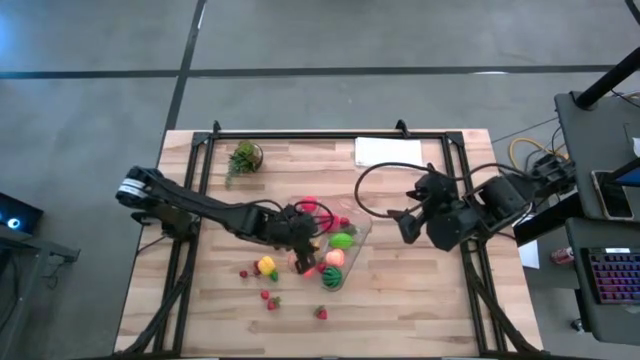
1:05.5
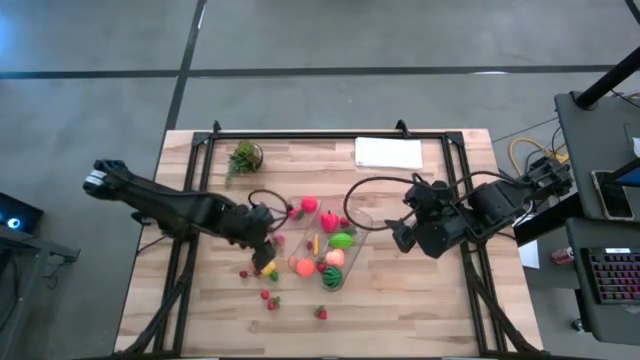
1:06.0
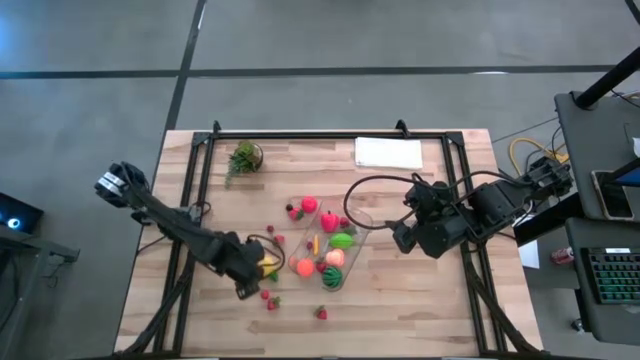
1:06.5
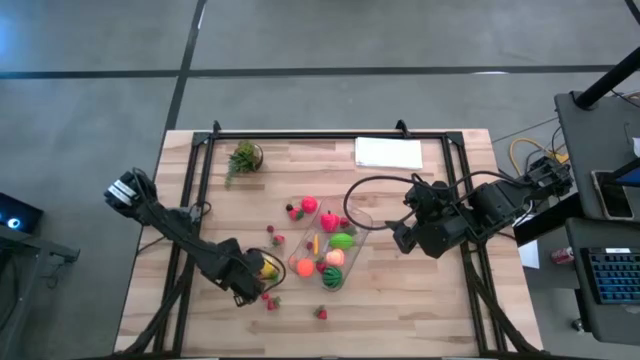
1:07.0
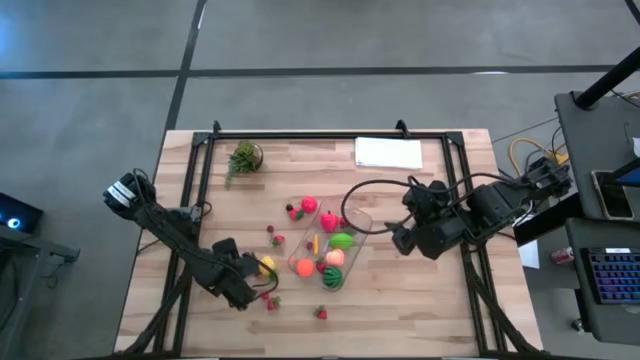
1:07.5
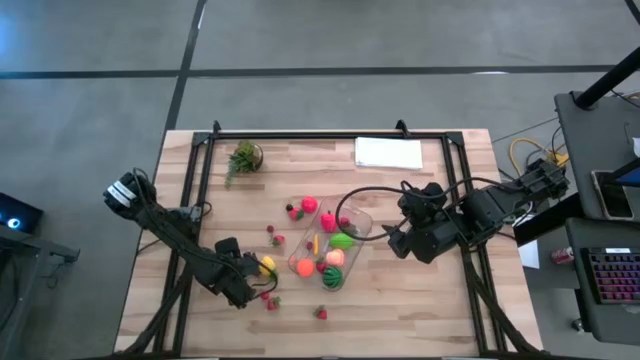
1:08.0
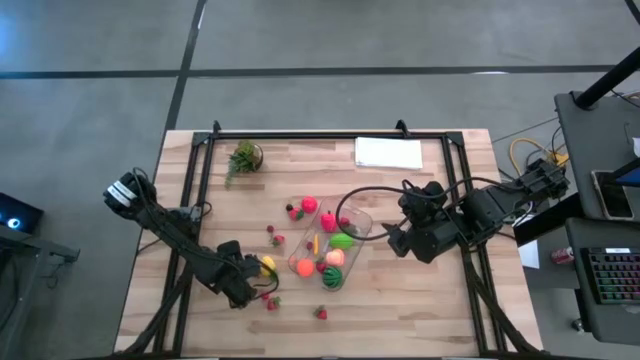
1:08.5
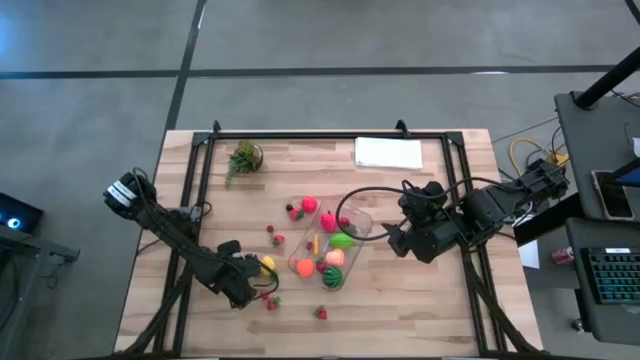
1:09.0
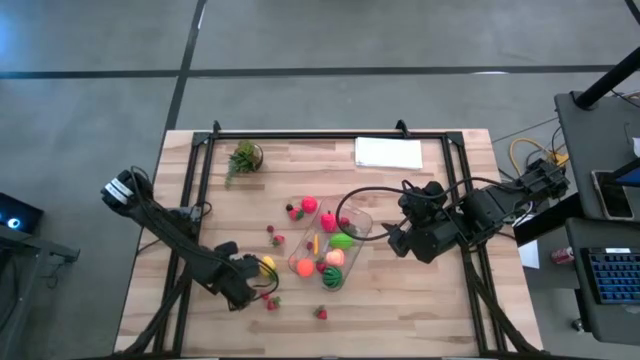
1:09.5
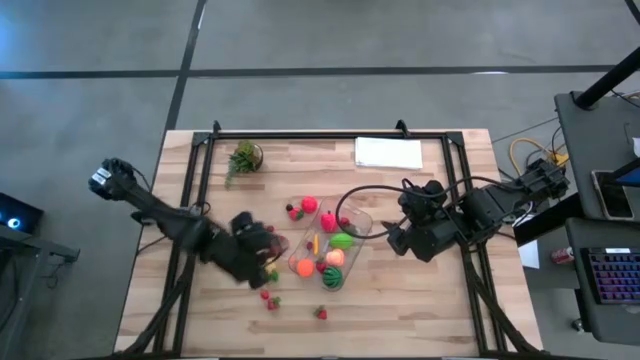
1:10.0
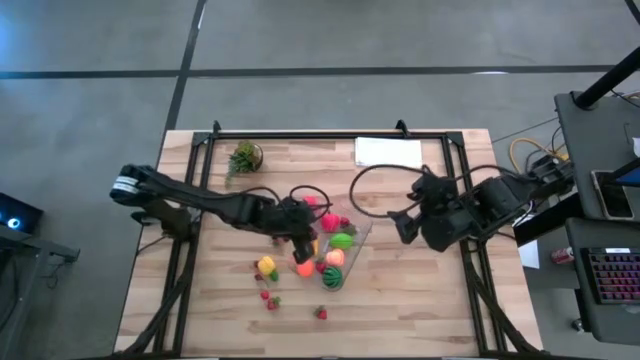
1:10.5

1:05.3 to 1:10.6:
Task: Pick and placing Produce into tupperware
Put the red cherry into the transparent bin

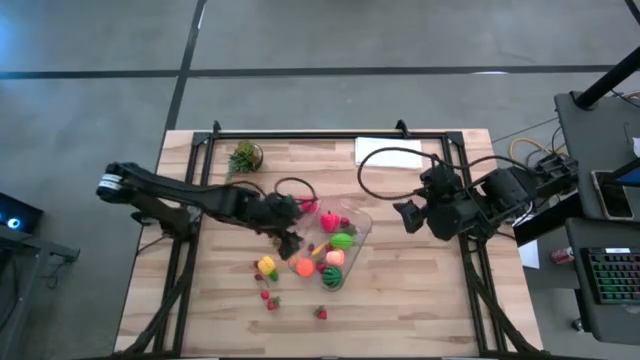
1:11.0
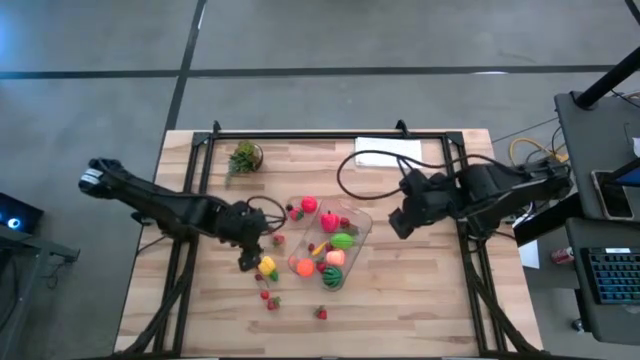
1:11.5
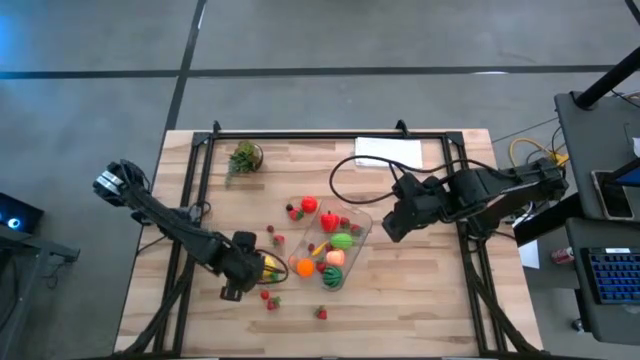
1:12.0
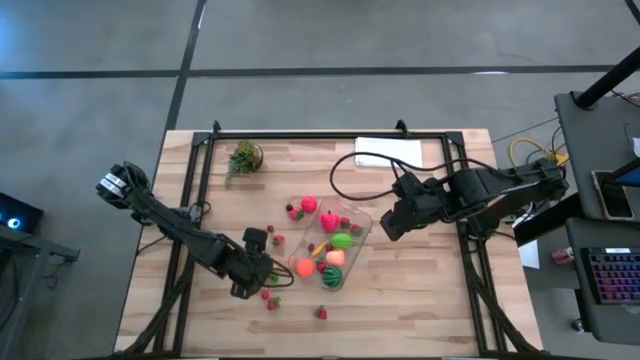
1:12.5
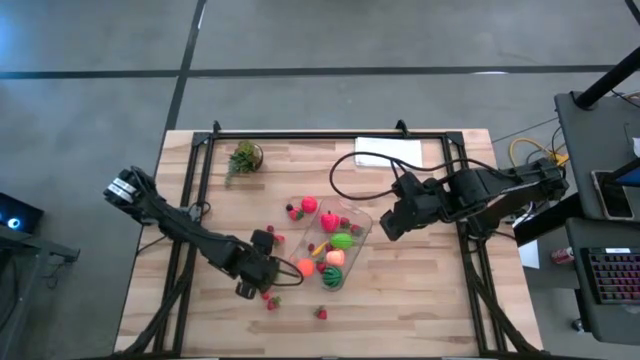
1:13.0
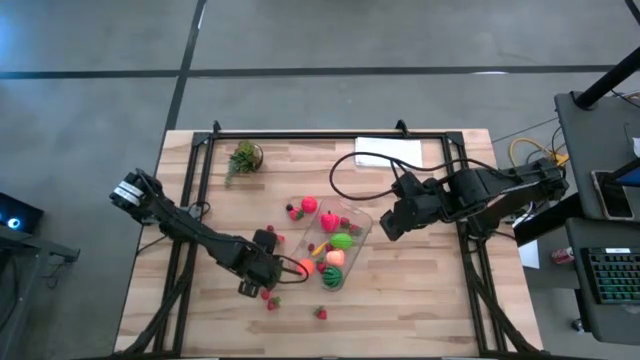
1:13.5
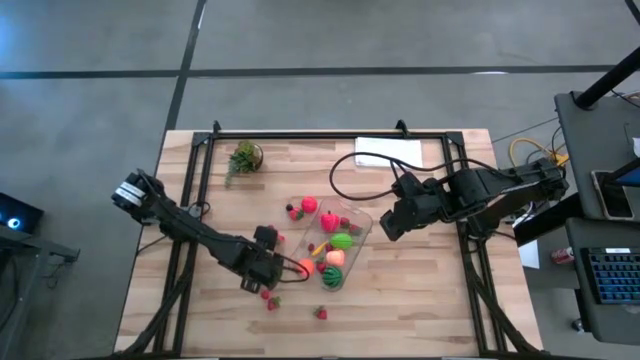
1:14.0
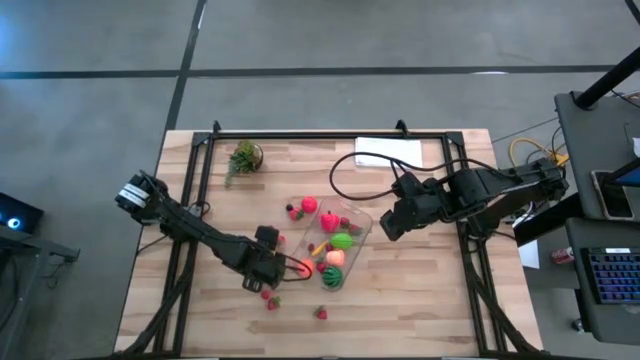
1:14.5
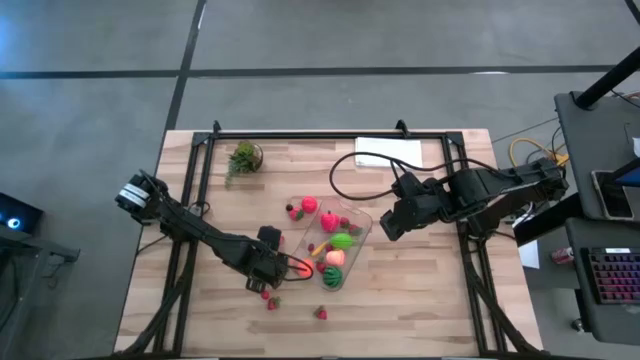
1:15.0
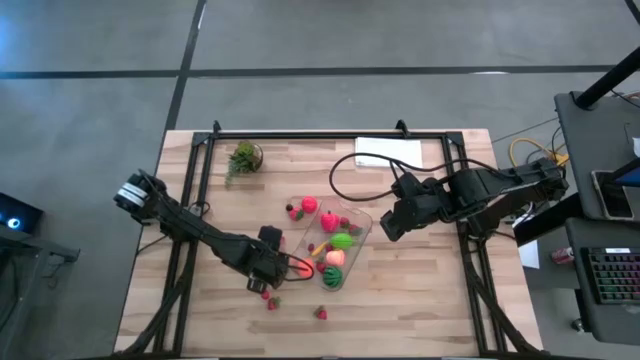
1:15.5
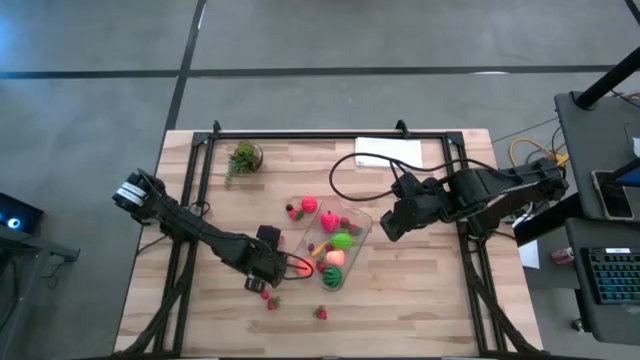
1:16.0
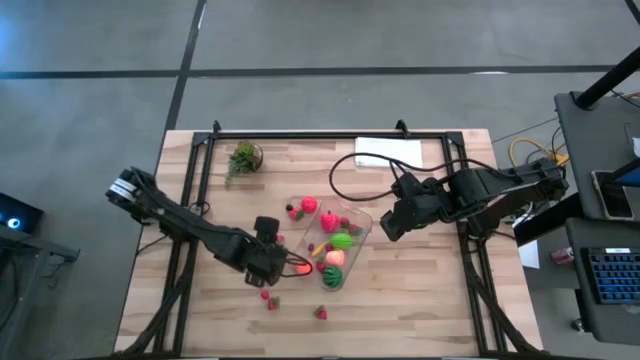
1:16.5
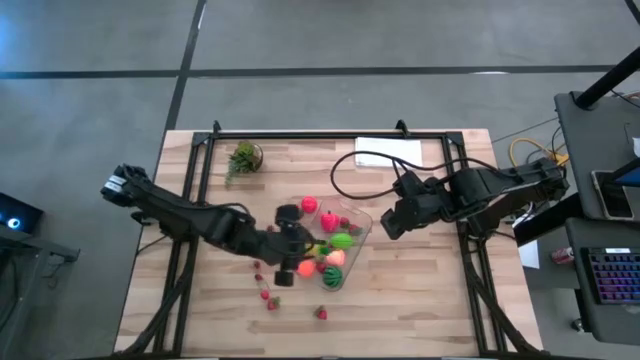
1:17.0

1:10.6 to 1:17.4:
Put the yellow pineapple into the transparent bin

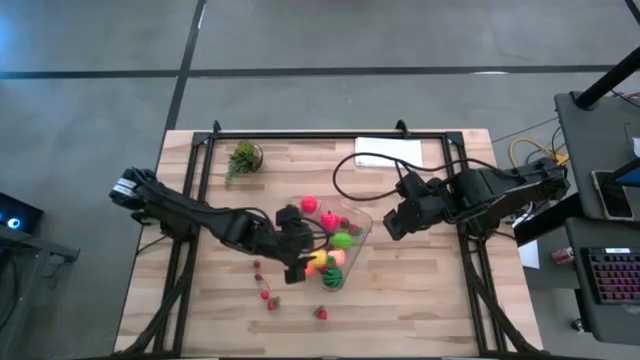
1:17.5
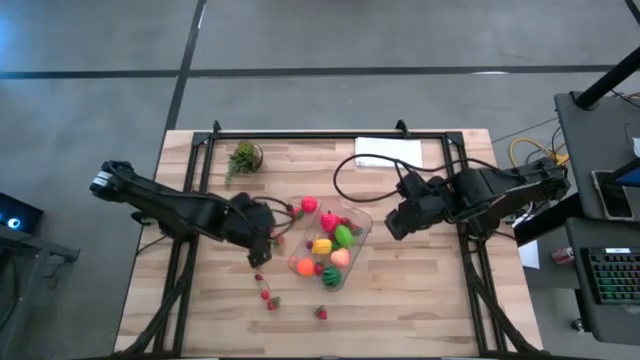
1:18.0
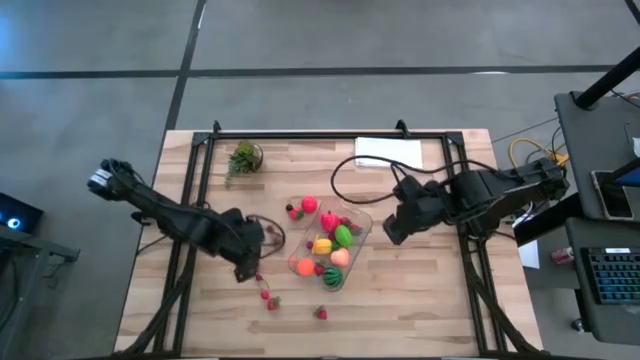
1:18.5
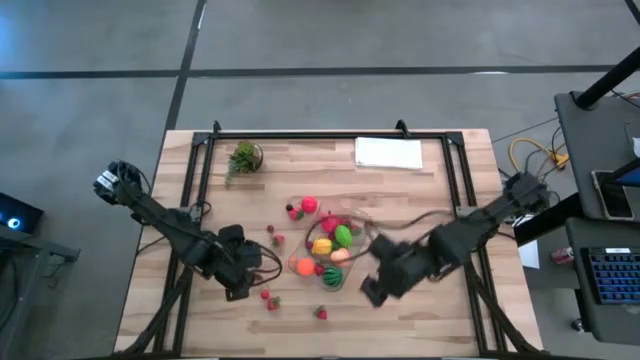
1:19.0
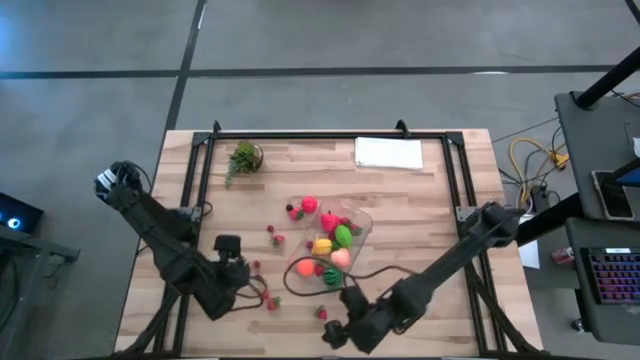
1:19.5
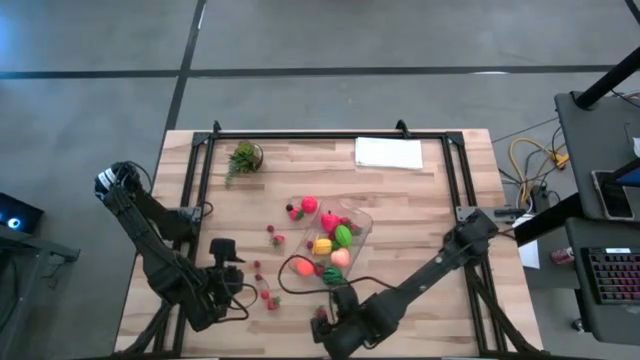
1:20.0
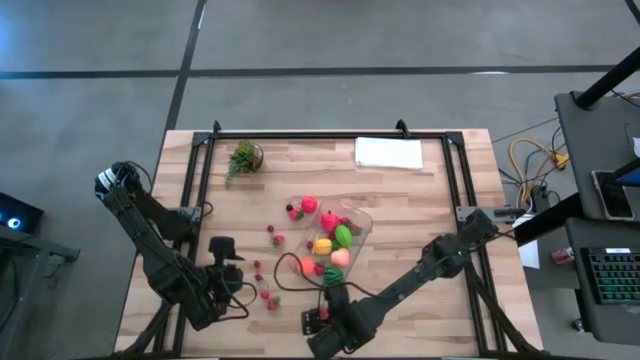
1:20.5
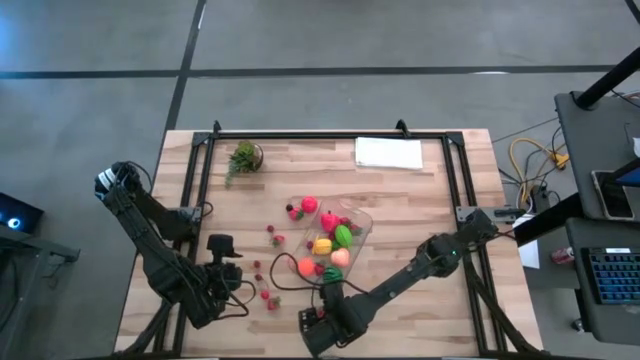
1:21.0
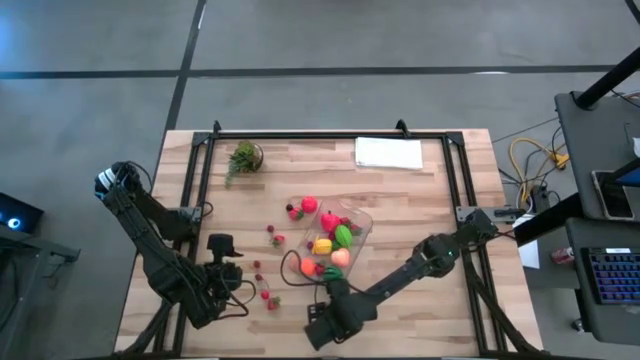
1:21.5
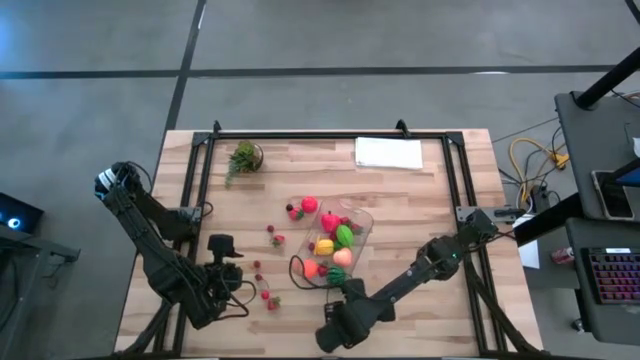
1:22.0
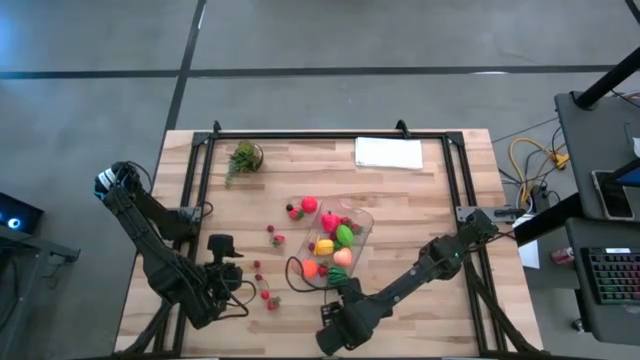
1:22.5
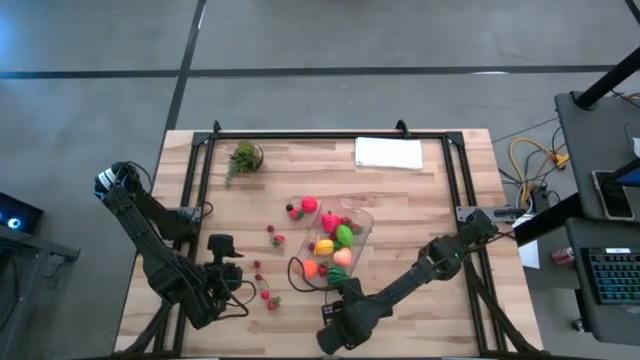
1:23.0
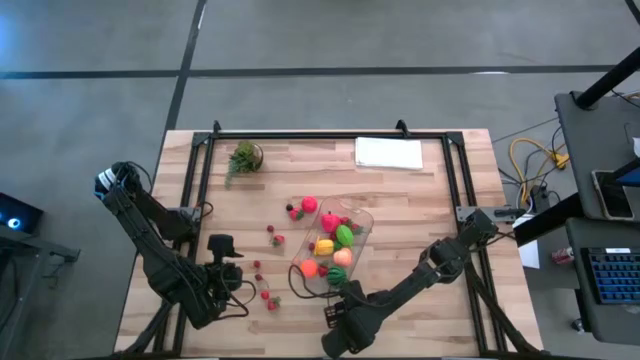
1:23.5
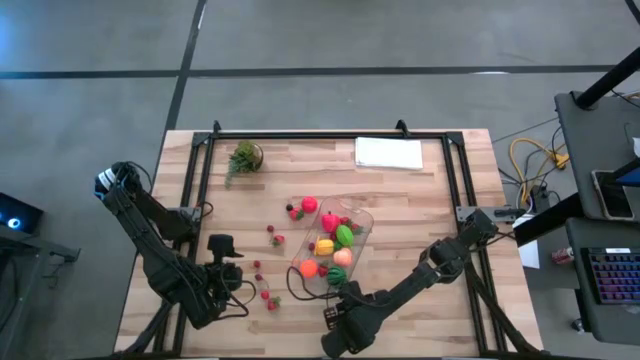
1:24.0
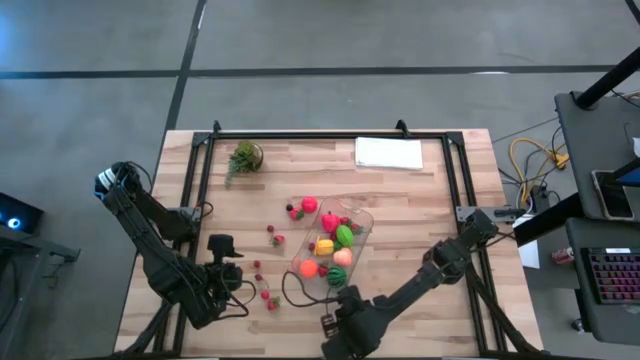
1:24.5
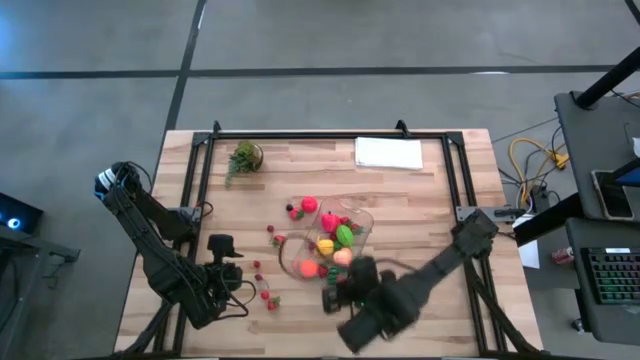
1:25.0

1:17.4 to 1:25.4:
Put the red strawberry into the transparent bin

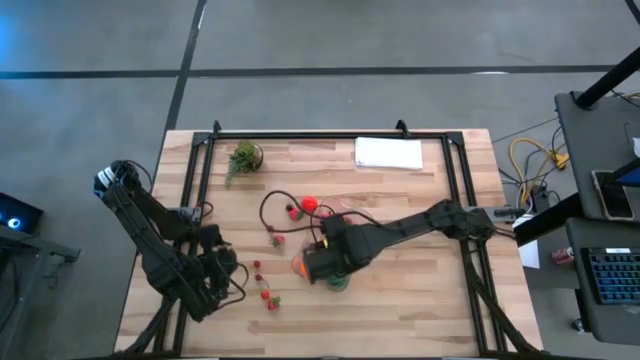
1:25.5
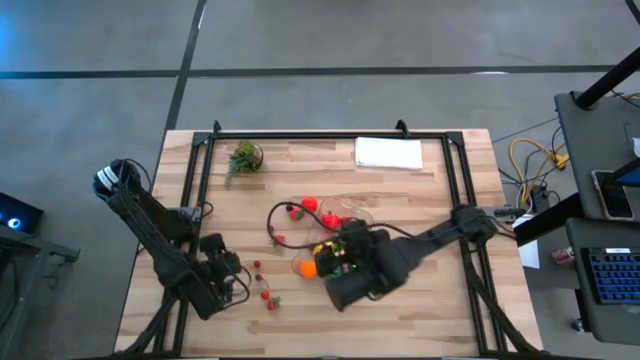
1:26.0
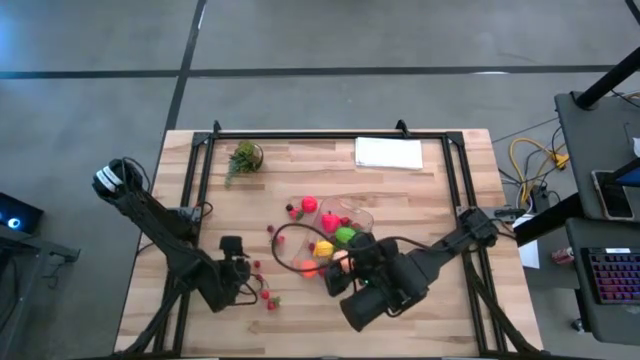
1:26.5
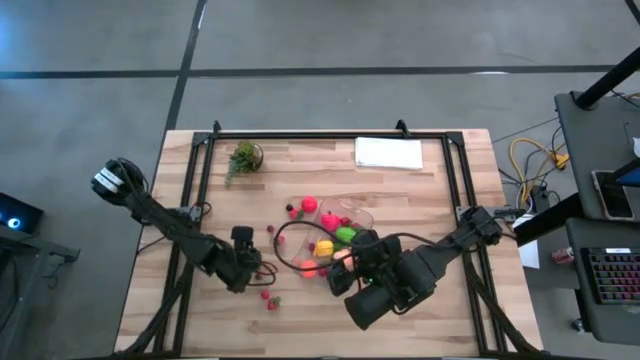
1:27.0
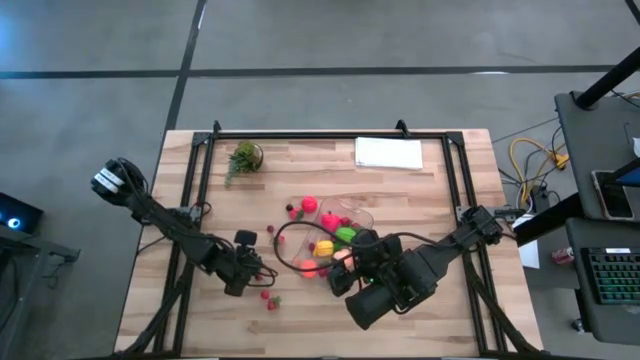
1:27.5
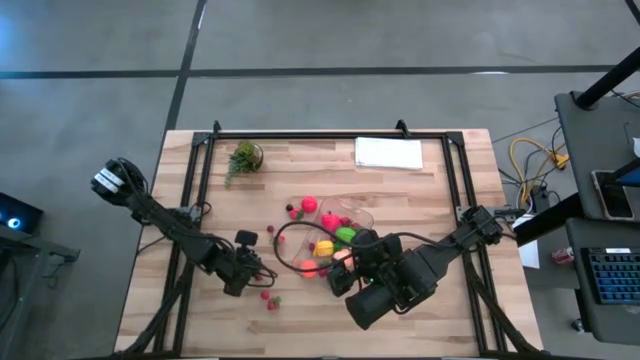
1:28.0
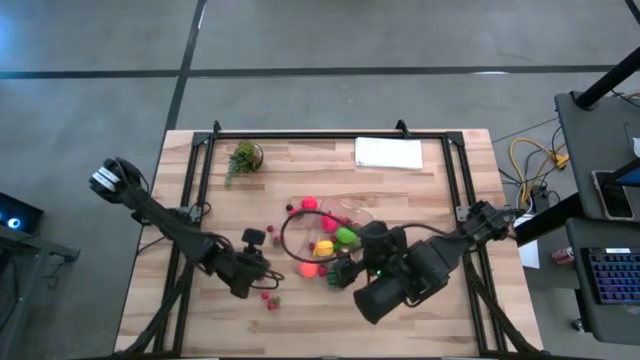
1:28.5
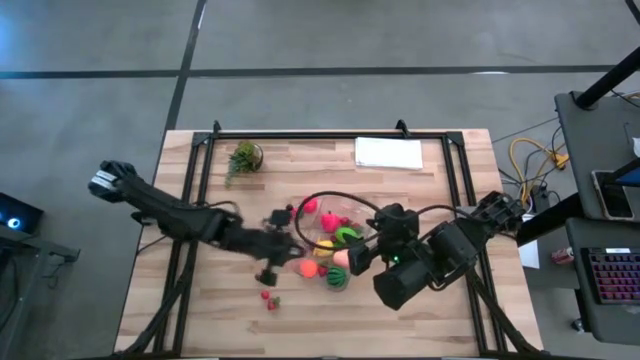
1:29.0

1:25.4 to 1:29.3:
Put the red cherry into the transparent bin
